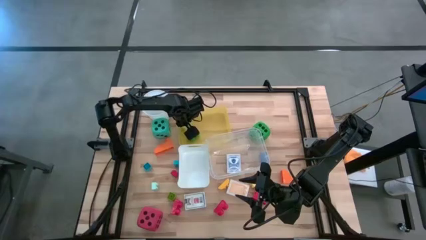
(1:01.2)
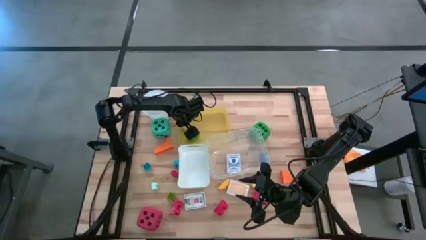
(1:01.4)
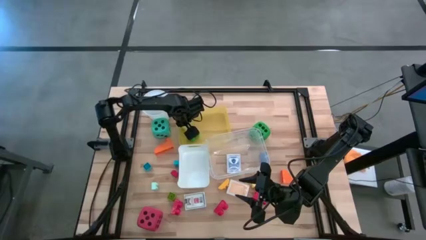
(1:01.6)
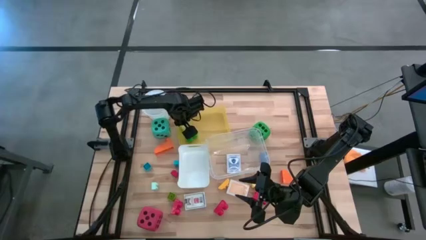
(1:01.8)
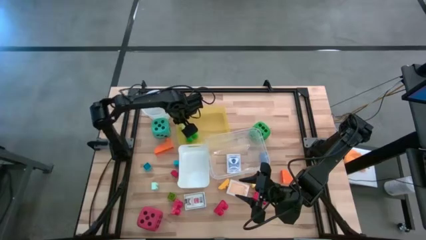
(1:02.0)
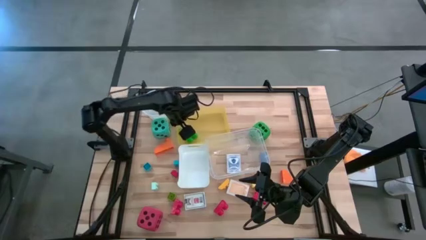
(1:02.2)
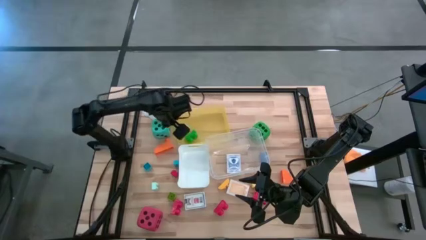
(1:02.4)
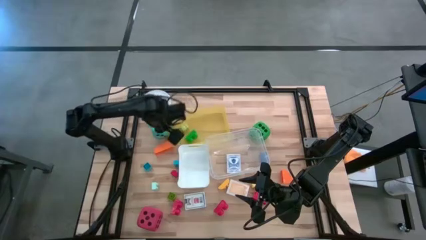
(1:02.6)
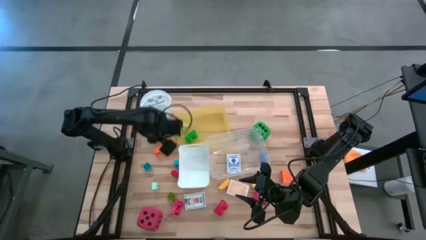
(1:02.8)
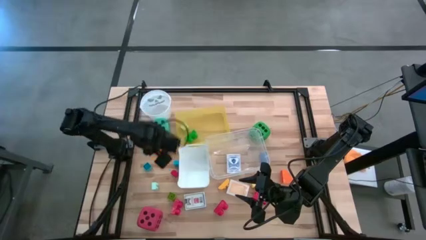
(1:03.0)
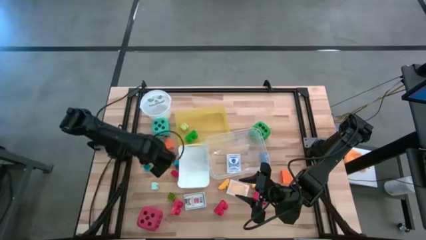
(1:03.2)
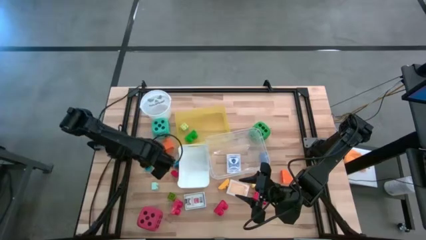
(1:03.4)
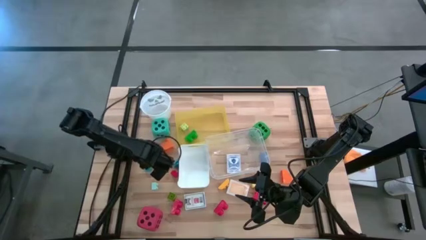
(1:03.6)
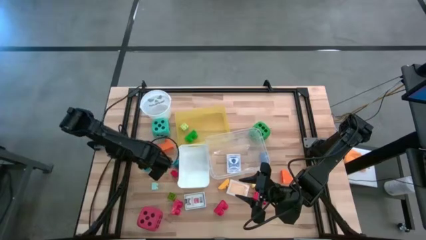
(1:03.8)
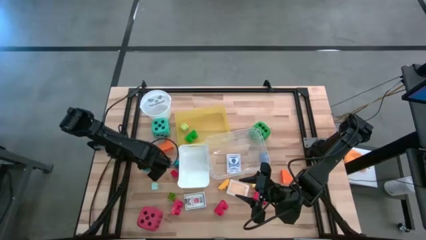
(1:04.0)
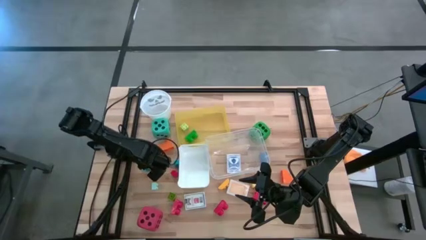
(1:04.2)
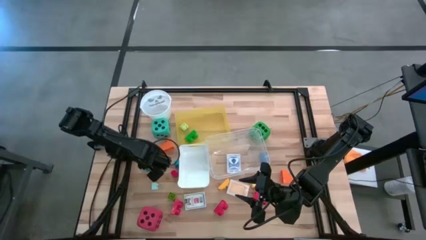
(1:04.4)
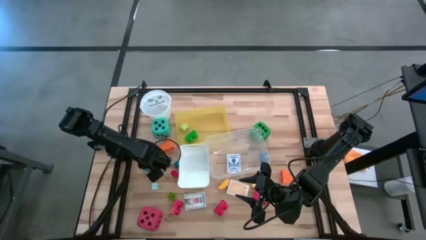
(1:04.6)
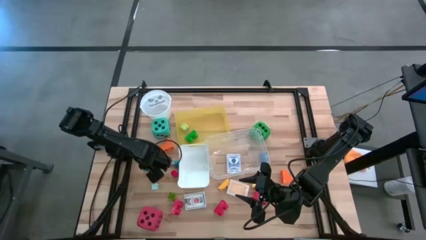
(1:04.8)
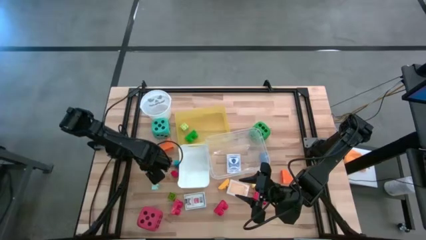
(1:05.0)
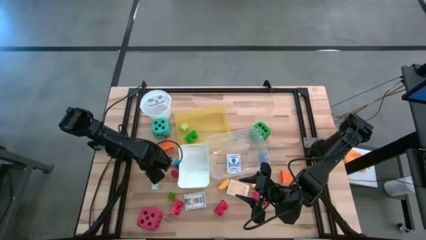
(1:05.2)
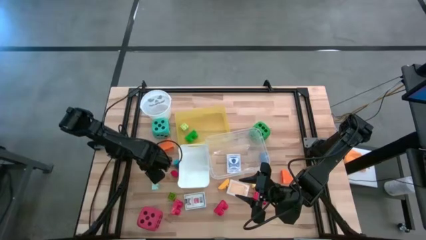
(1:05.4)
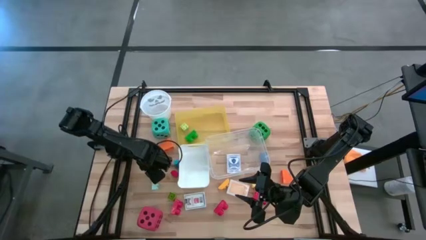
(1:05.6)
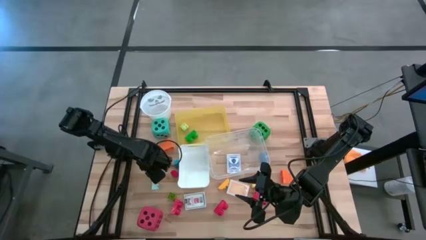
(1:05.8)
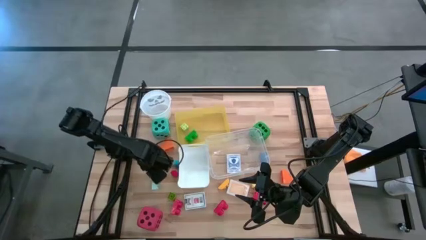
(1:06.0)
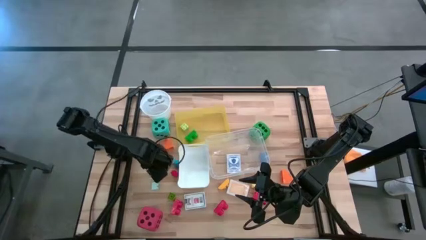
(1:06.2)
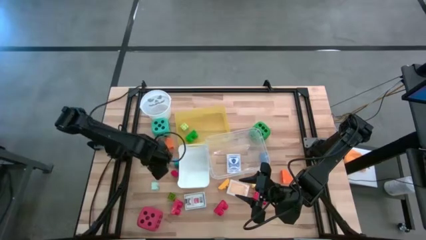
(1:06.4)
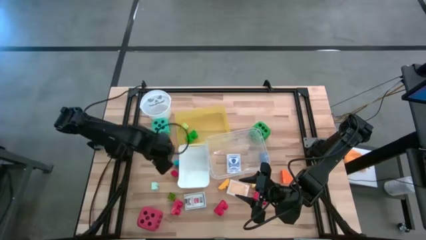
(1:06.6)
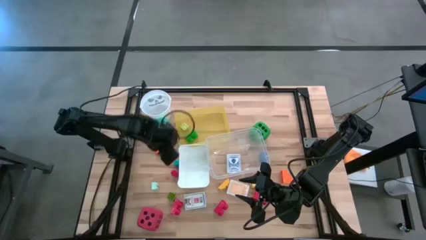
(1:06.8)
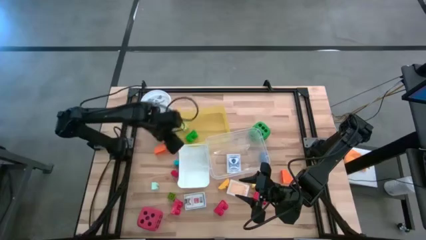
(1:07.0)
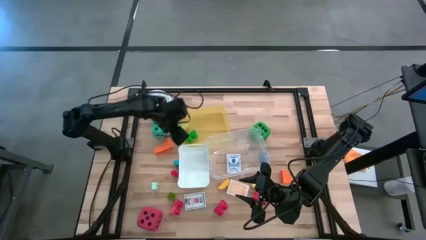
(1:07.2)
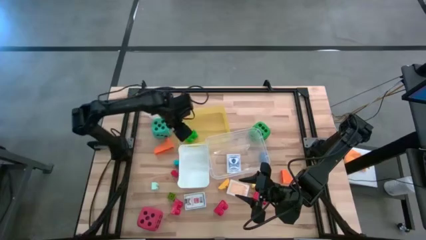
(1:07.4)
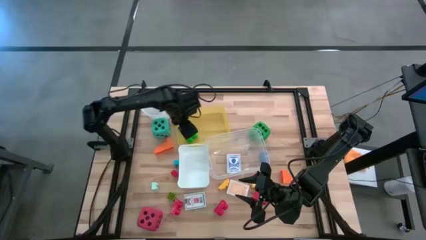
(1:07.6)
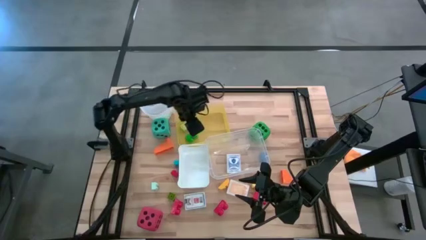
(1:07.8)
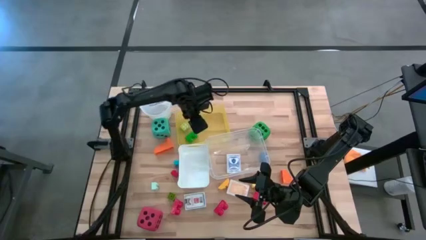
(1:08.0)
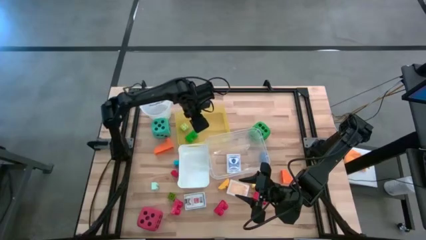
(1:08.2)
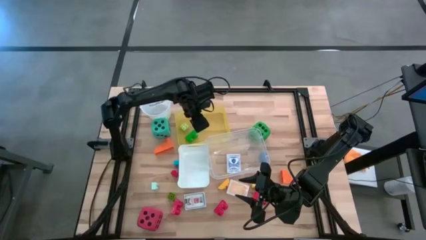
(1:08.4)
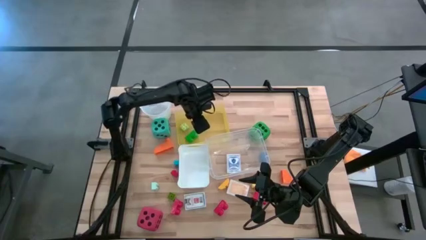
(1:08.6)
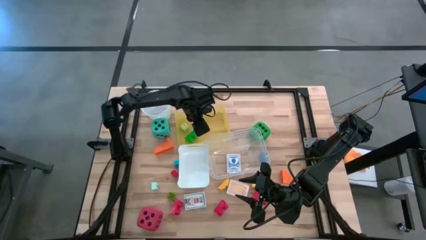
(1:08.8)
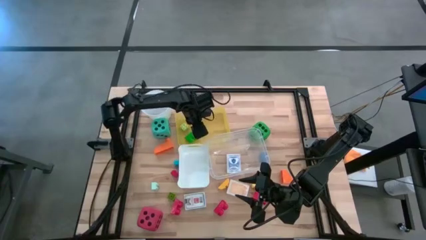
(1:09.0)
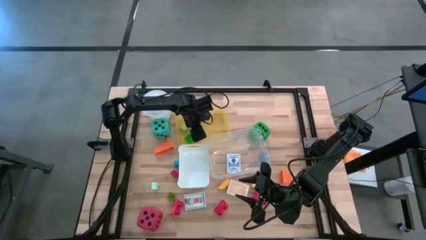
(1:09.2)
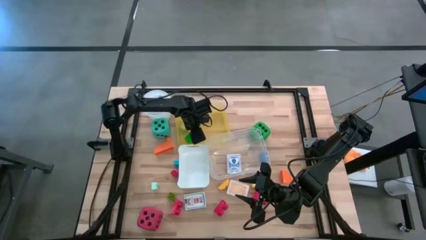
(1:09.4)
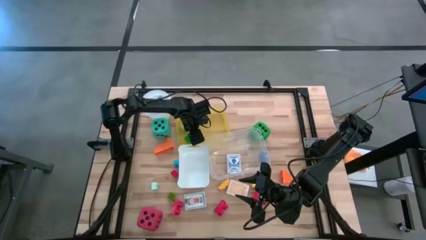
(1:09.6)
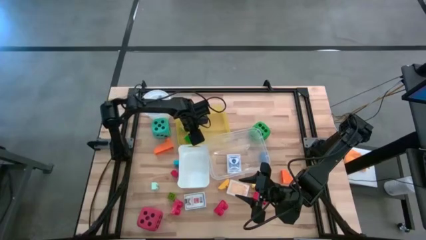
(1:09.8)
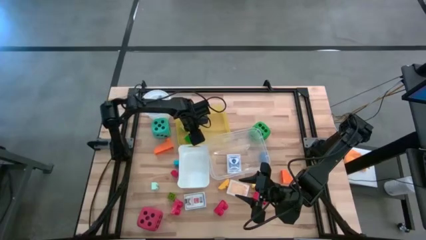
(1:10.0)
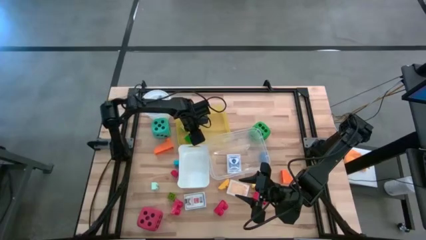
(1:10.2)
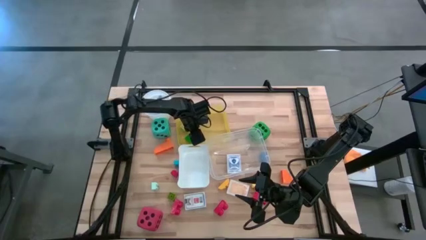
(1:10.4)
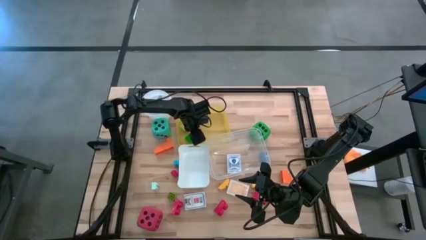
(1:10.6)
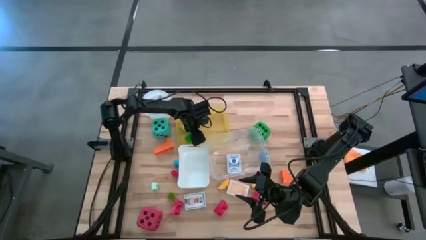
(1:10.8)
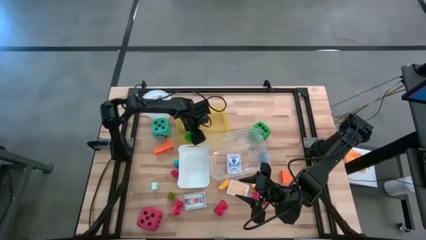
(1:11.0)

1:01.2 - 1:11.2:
Task: Pick & Place Toys
Put the blue game piece into the yellow bin

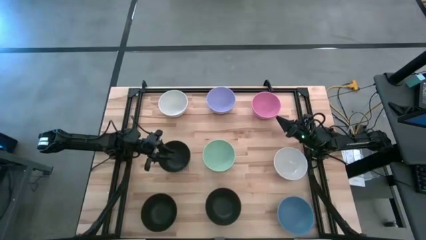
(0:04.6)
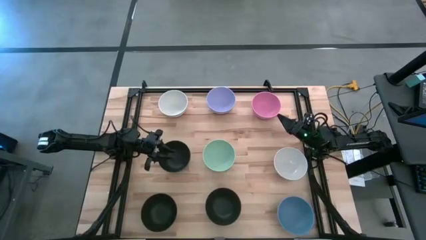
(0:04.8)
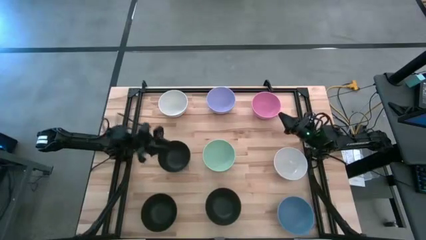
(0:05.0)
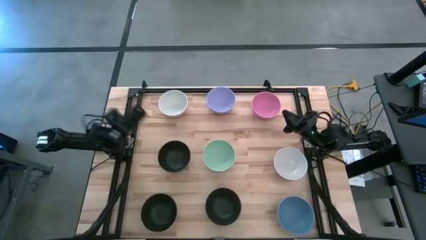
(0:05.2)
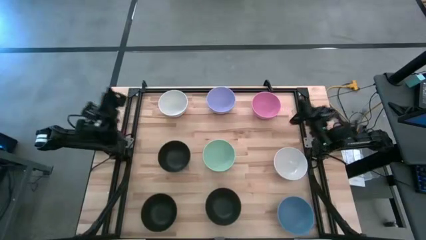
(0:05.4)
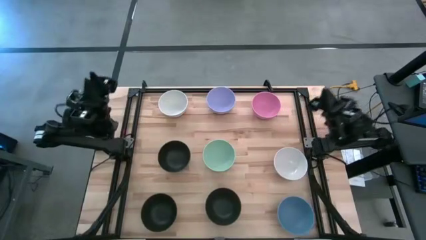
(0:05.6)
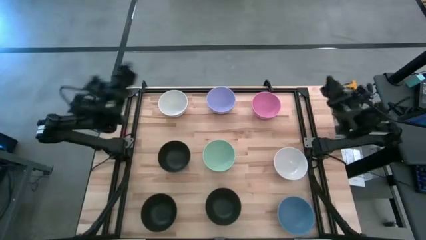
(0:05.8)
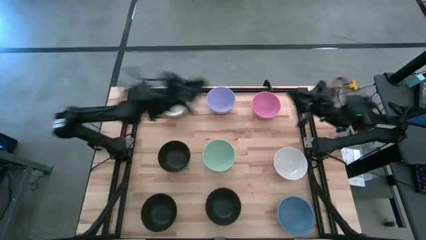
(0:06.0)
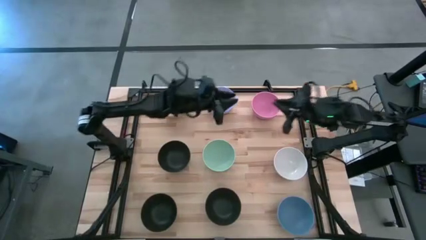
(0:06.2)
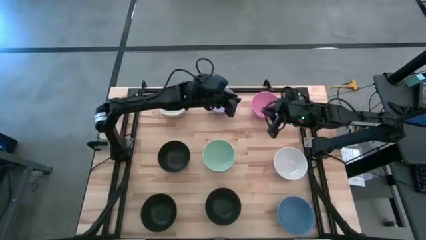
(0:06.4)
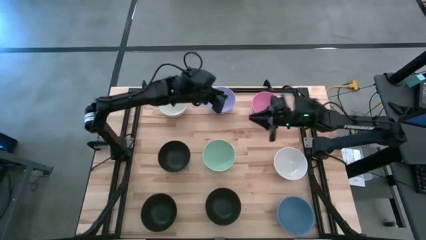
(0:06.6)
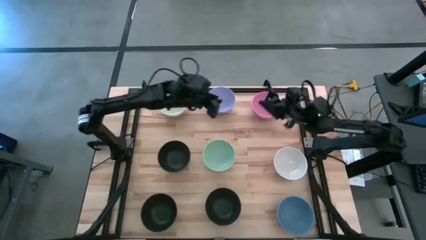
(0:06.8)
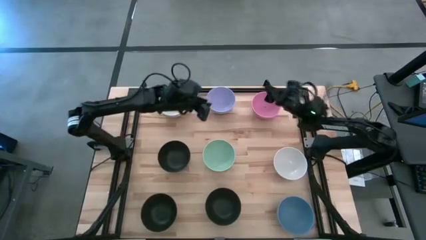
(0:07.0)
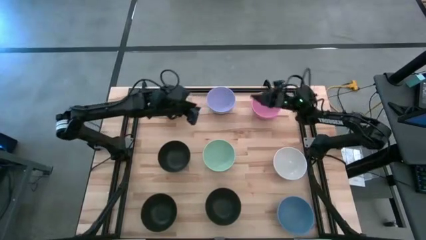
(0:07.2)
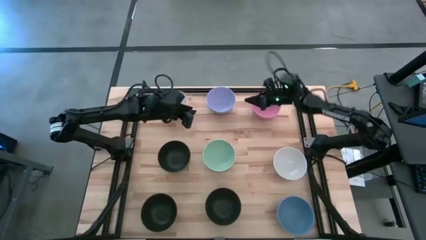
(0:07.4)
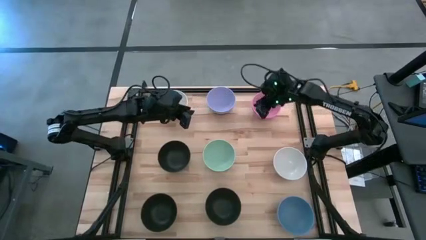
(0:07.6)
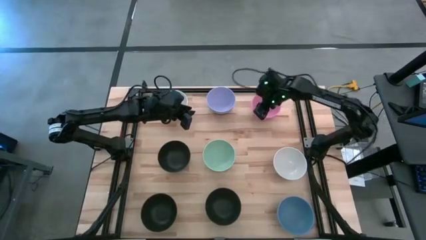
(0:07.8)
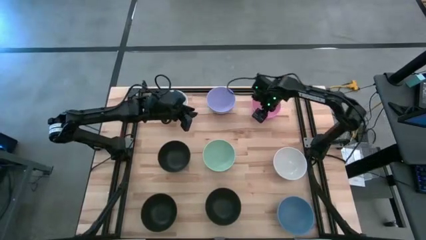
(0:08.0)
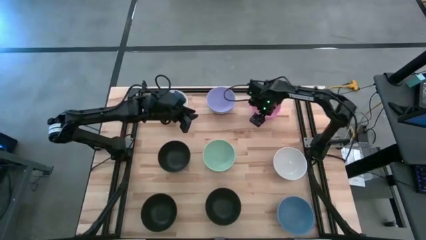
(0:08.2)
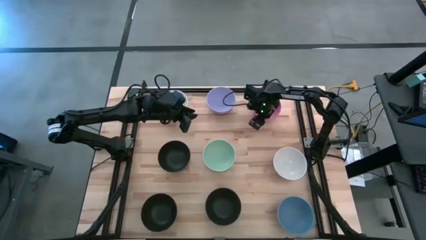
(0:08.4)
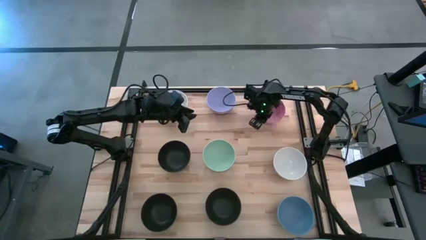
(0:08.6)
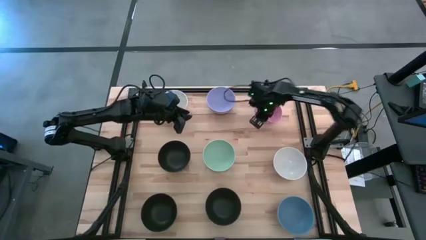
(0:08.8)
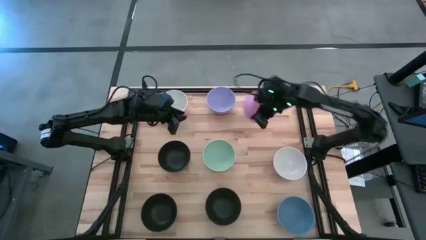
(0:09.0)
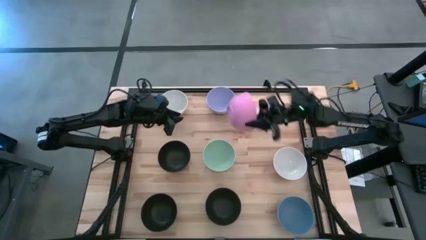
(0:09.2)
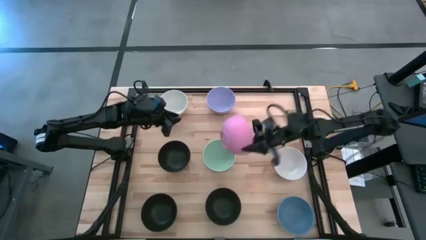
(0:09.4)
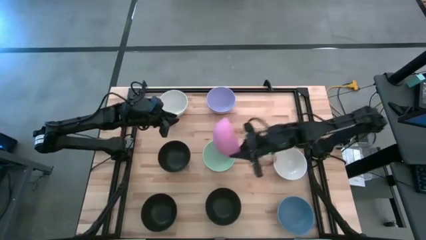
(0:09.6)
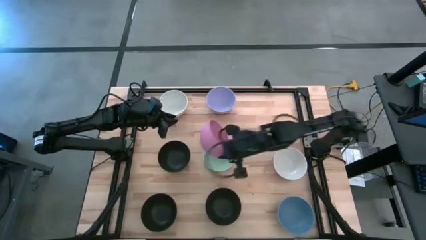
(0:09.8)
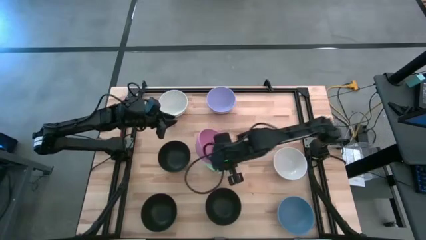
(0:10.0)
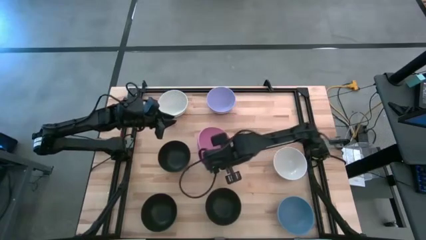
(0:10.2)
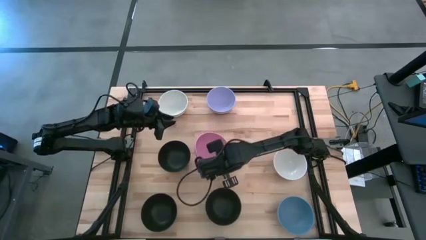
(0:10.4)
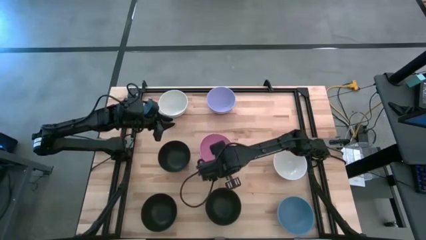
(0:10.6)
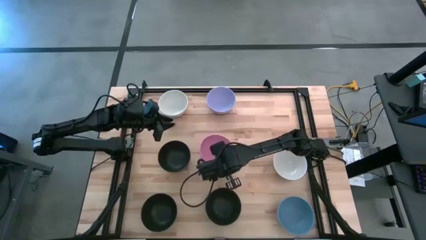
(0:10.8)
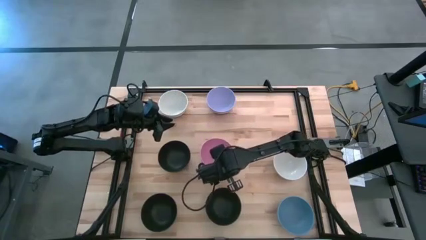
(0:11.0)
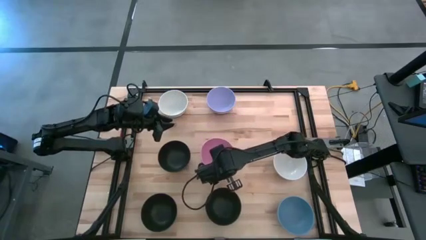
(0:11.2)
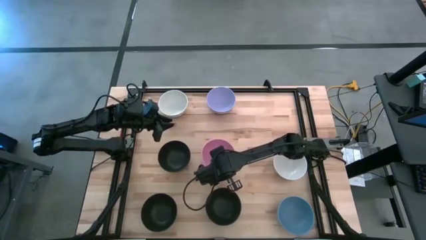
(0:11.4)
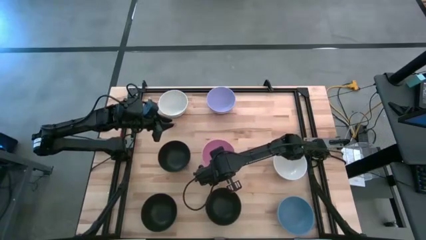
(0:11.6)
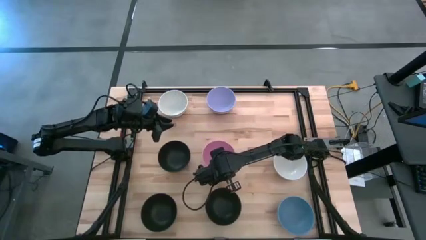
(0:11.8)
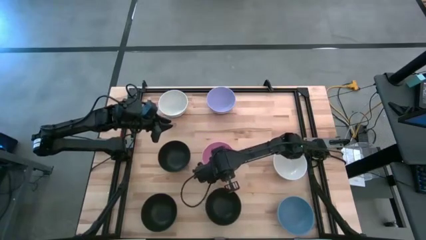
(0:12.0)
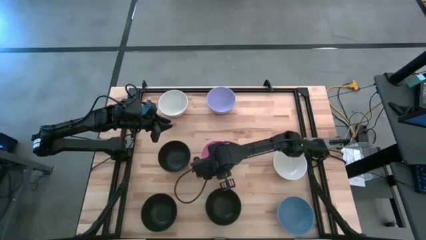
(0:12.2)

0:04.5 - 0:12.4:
Task: Nest bowls inside each other
Stack the pink bowl on top of the green bowl
